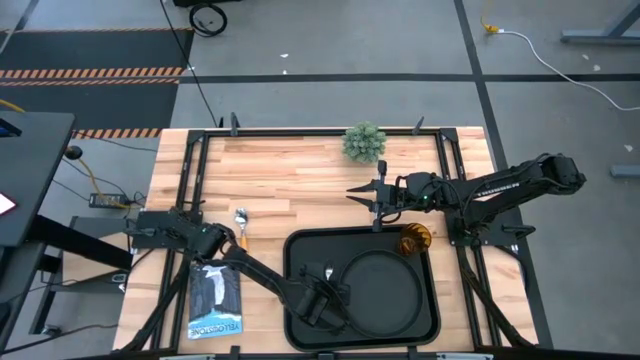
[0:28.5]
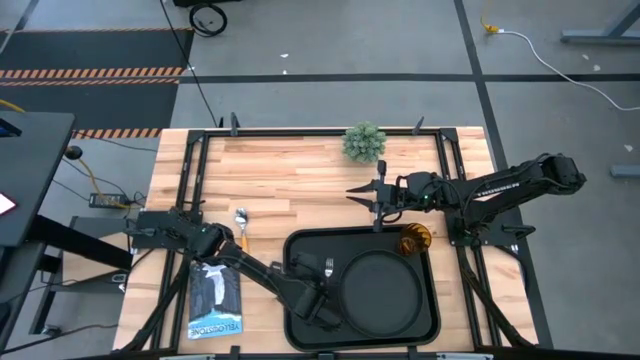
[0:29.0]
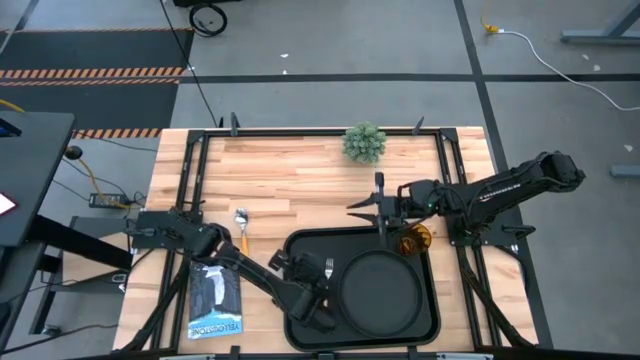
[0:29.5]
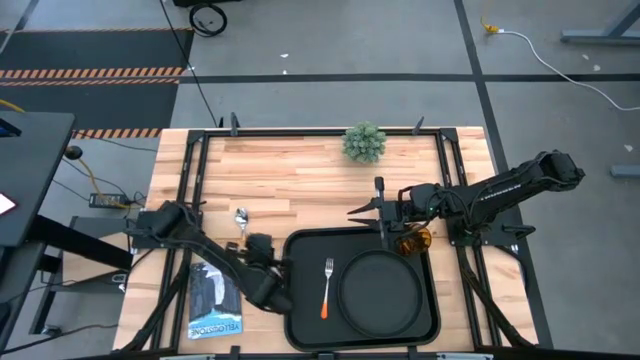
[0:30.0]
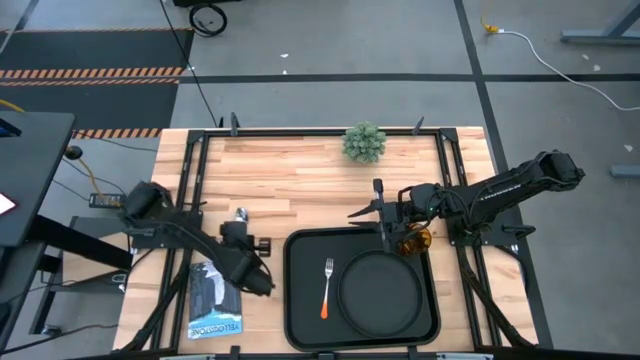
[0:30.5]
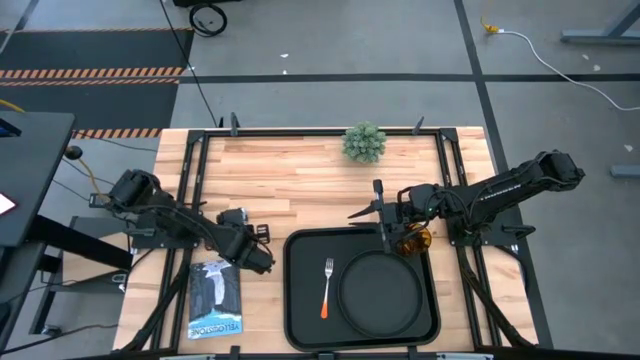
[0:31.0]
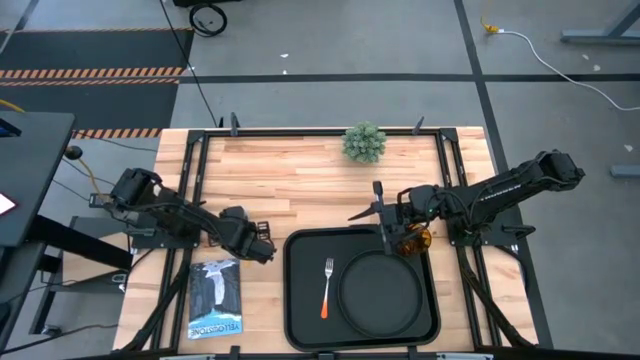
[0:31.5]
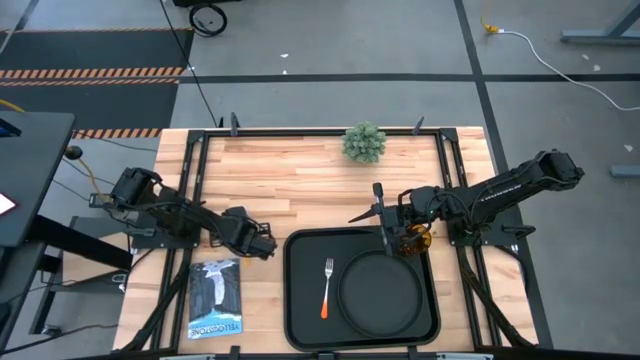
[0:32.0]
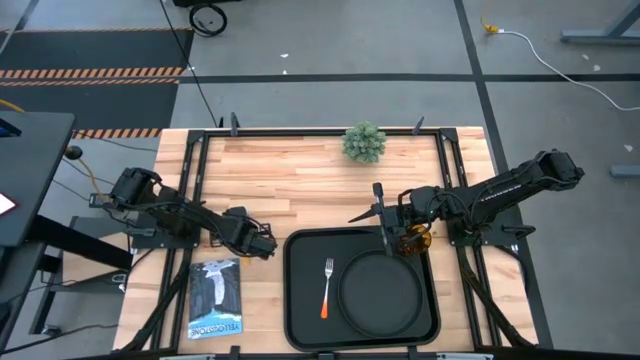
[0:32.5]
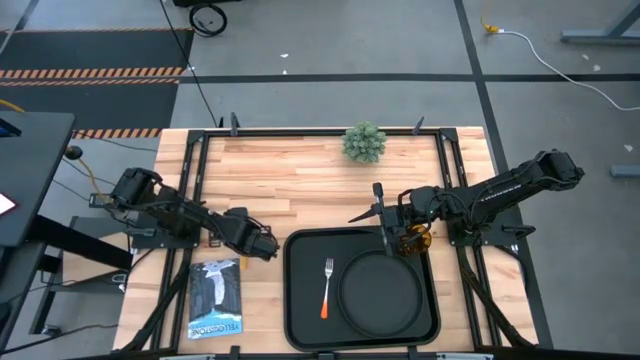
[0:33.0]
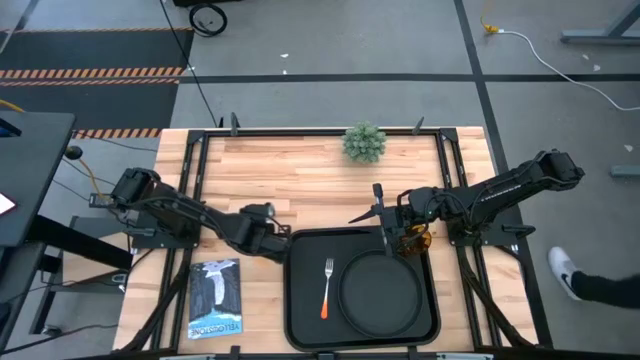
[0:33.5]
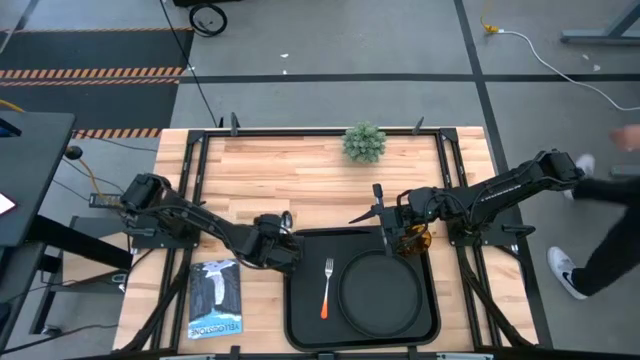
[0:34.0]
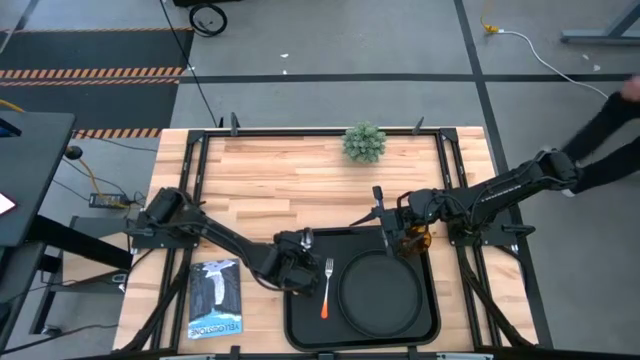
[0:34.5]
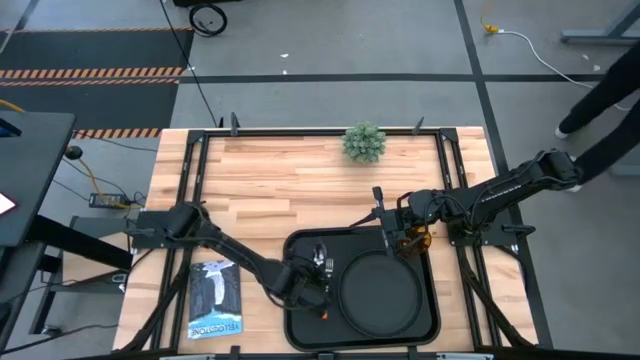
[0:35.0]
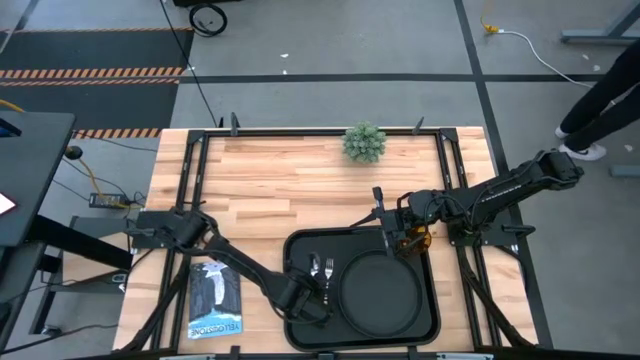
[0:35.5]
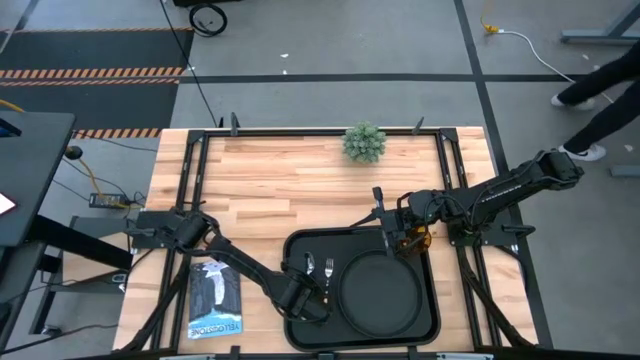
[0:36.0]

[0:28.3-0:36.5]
Task: Pick and place plate/cup/fork/spoon on tray
Put the yellow spoon on the left side of the white orange fork

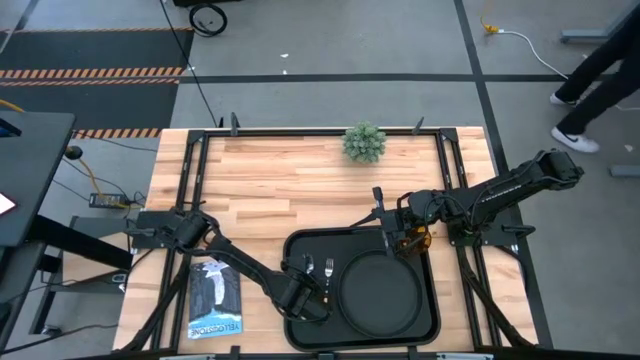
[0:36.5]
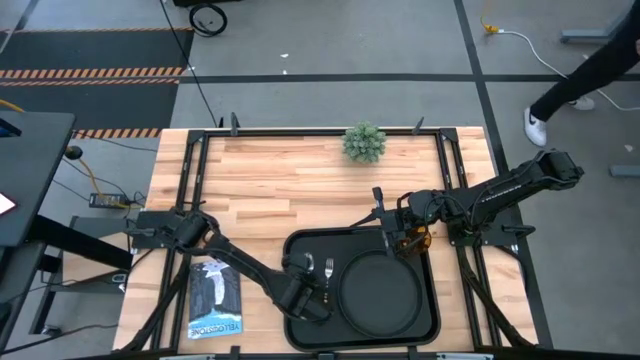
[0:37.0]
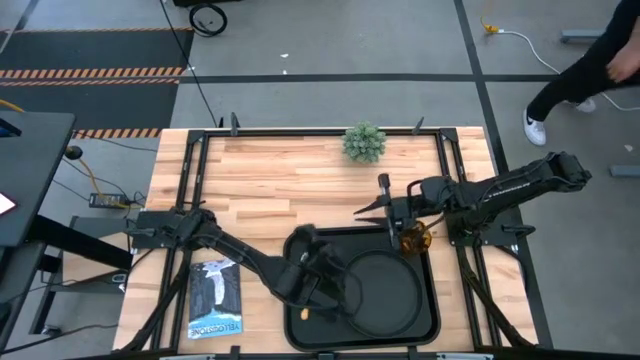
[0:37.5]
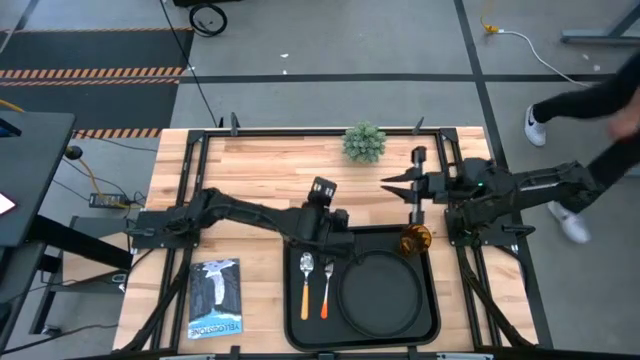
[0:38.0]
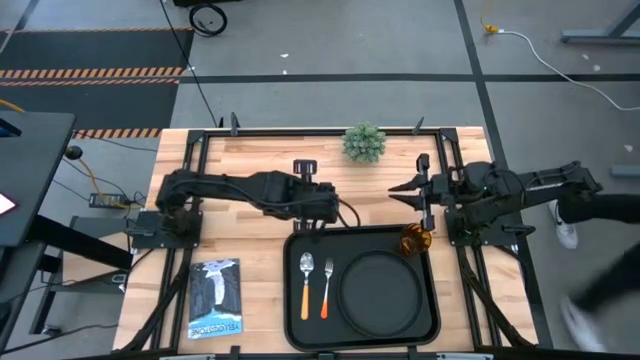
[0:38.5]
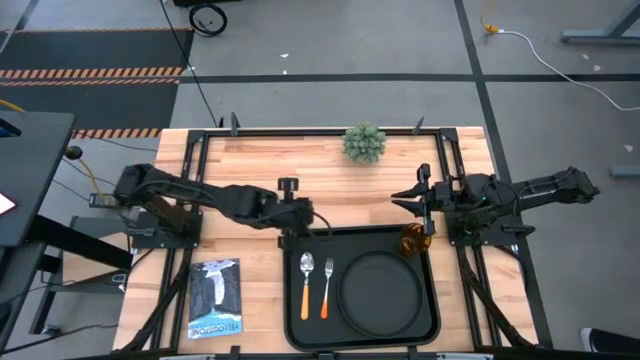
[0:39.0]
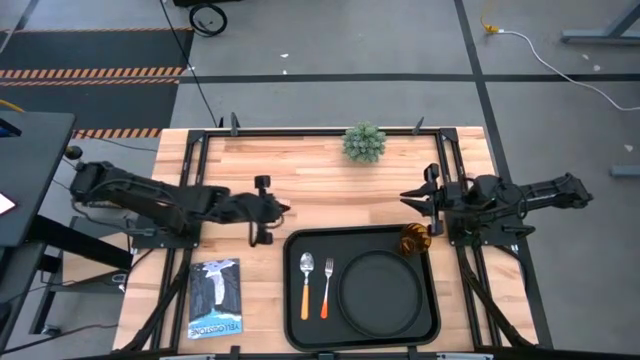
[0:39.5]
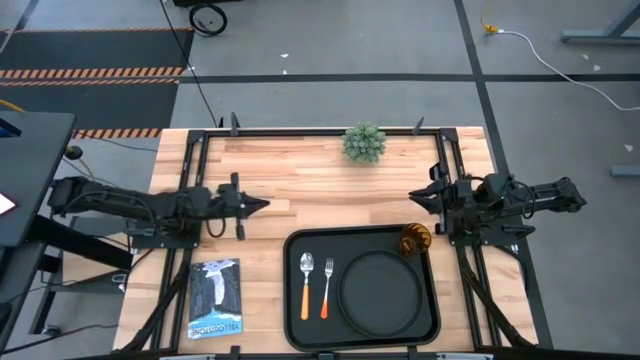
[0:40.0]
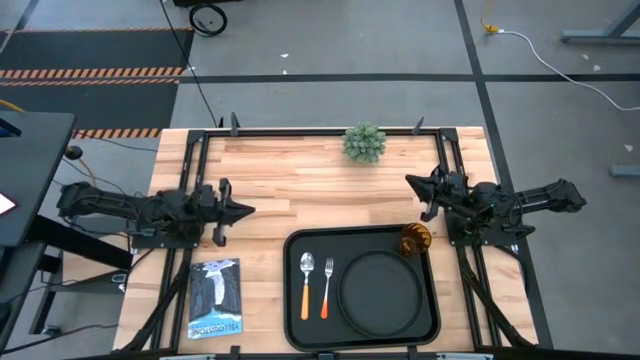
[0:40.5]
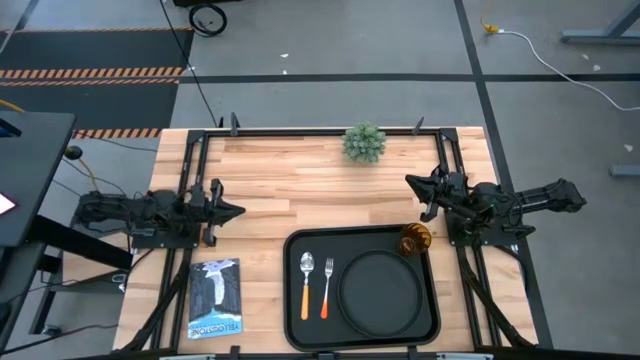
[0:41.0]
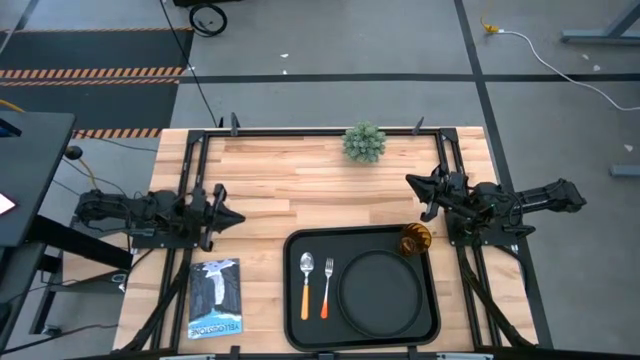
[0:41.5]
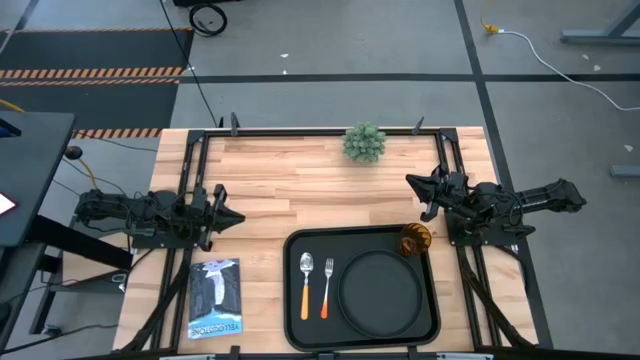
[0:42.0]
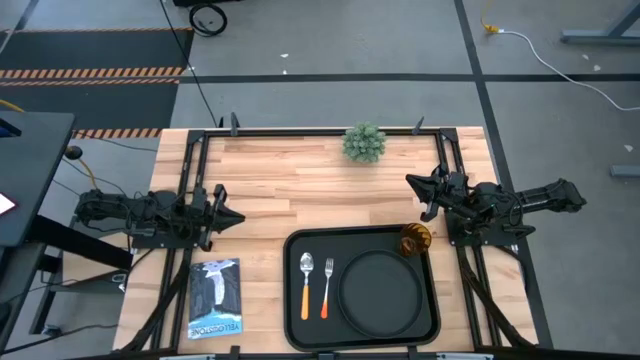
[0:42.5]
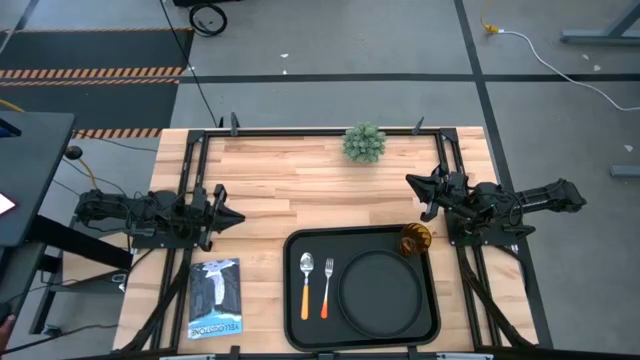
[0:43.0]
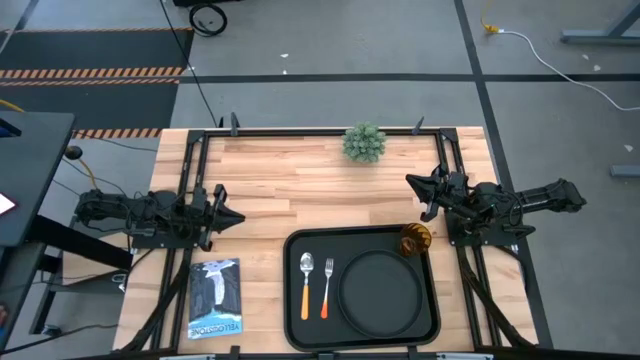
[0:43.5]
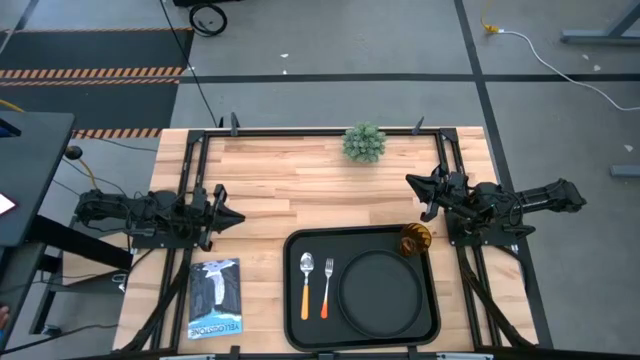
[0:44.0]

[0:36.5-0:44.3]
Return to Home Position

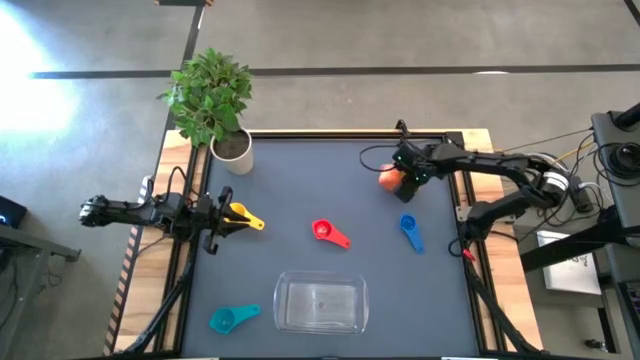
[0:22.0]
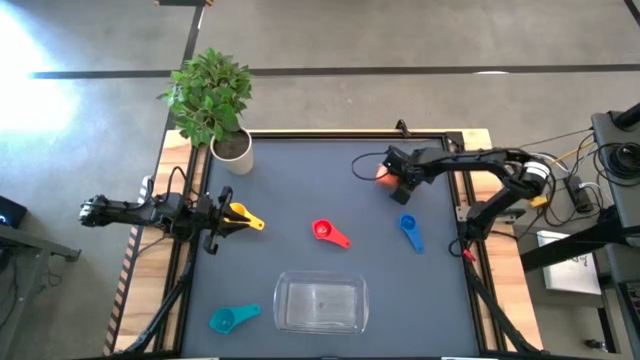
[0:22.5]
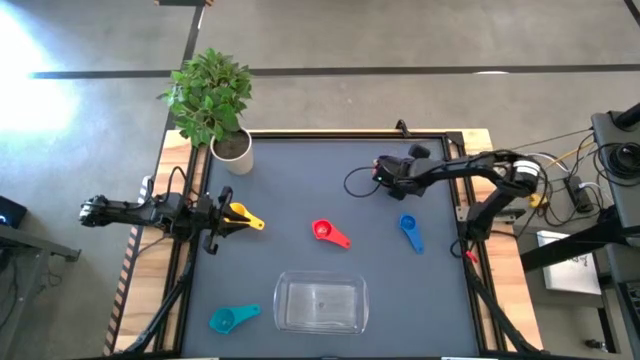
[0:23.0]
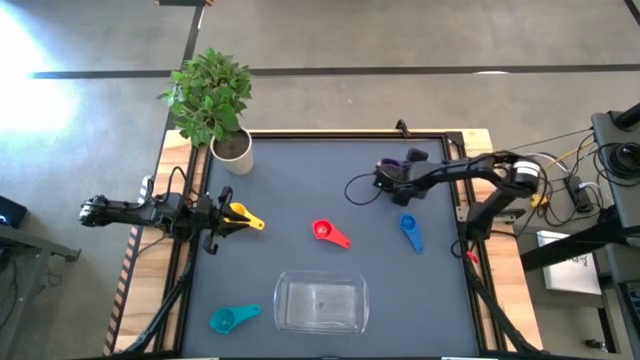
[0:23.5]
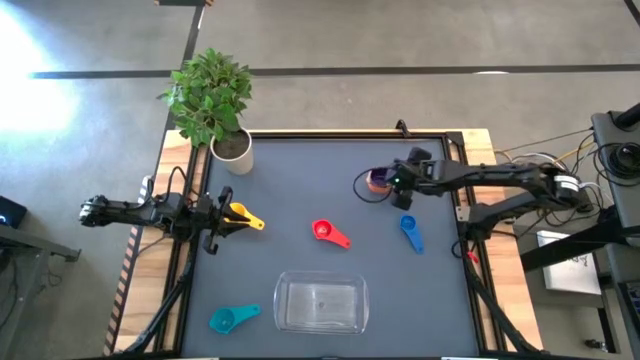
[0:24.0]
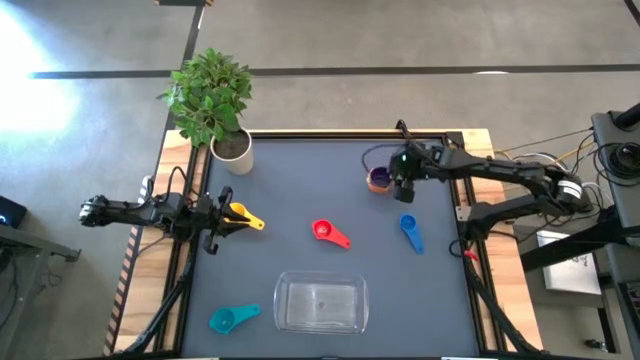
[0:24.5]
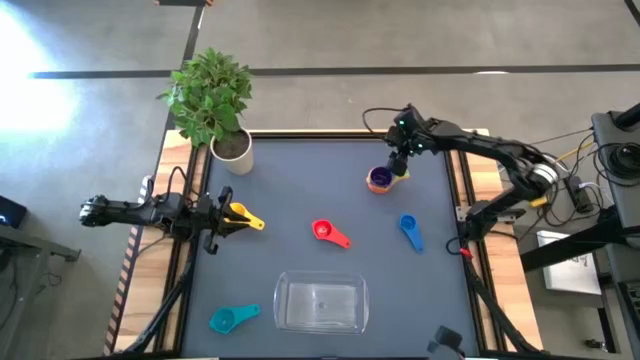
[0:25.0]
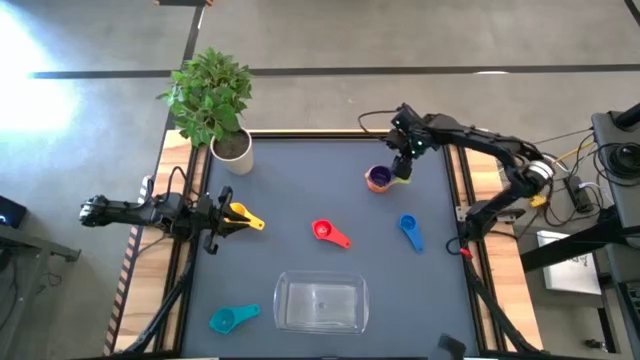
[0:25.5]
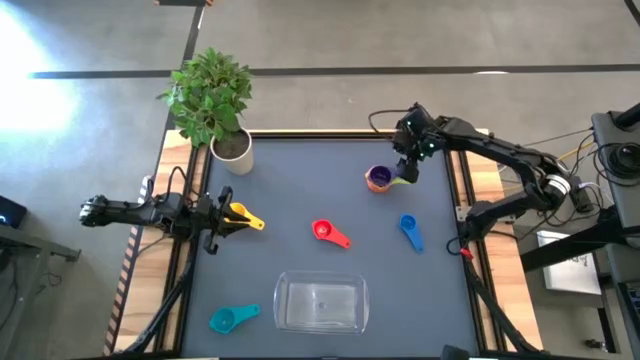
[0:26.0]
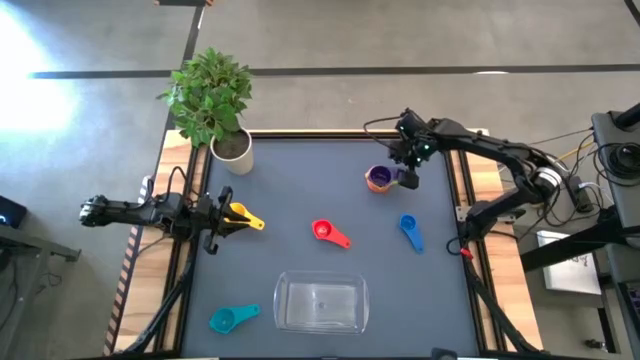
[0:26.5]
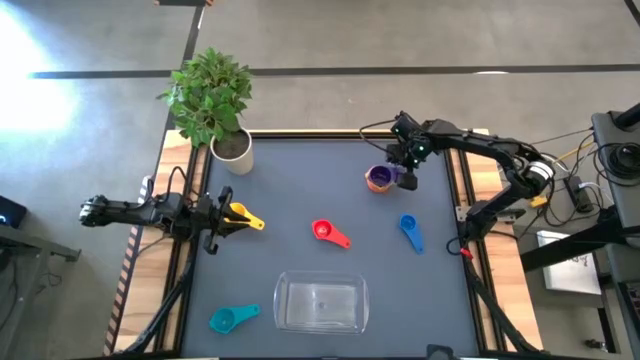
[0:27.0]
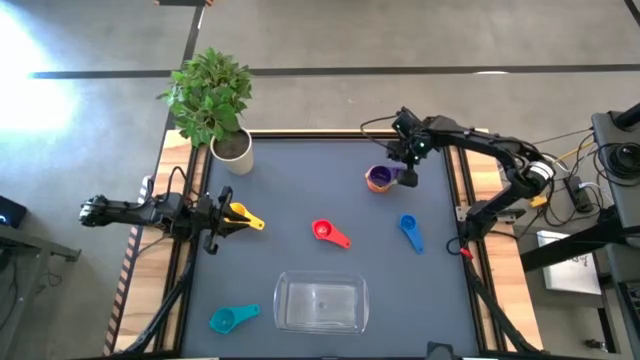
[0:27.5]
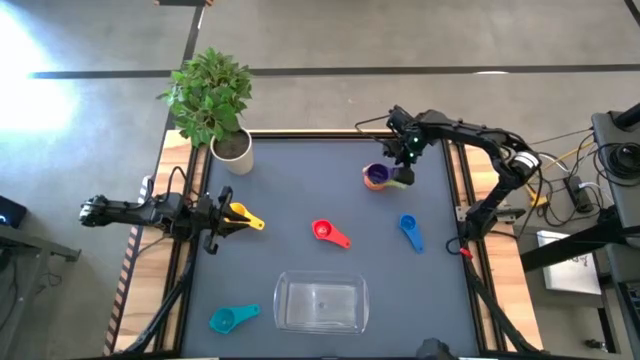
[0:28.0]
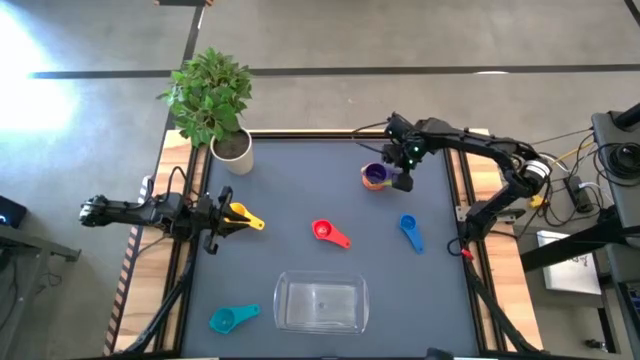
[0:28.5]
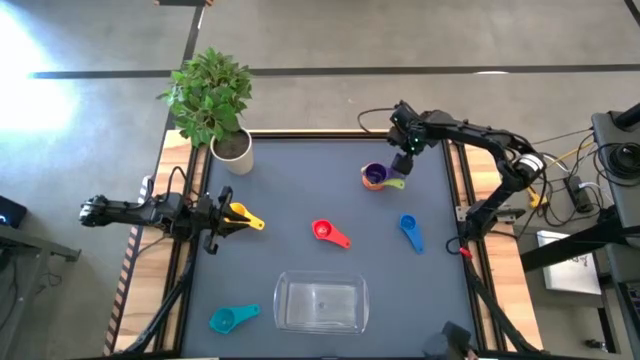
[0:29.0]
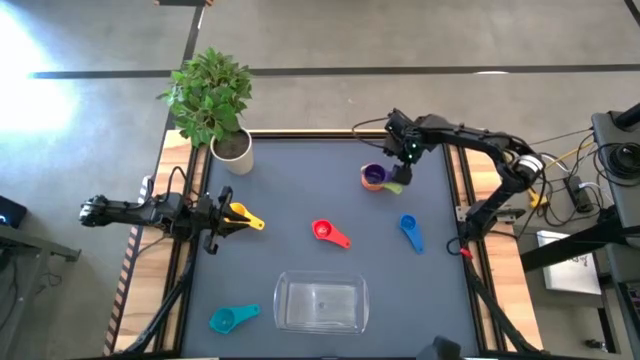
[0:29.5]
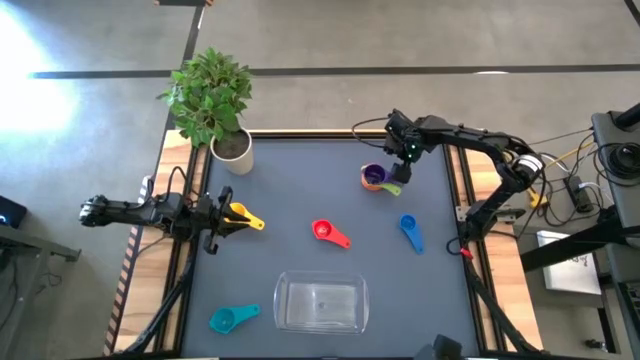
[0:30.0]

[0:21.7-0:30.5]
Task: Nest measuring cups in basket
Stack the violet measuring cup on top of the green measuring cup
